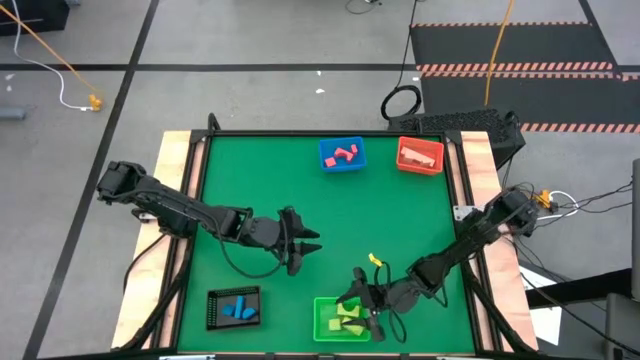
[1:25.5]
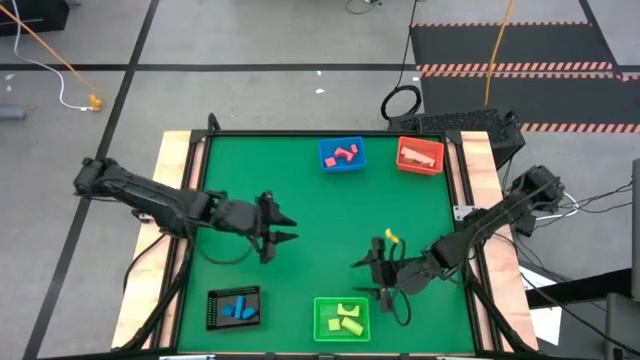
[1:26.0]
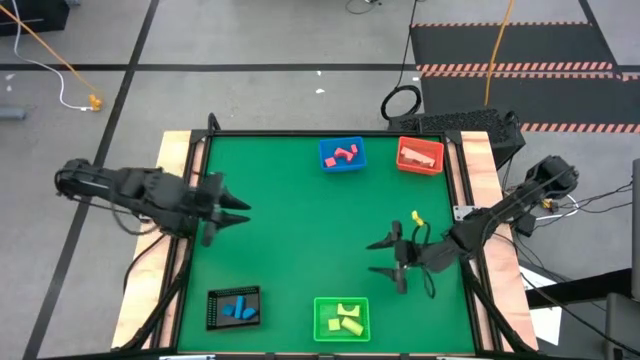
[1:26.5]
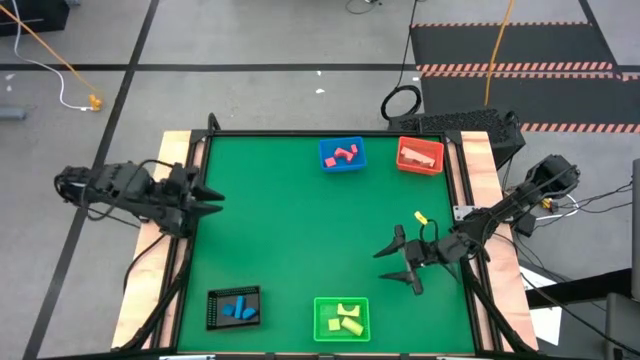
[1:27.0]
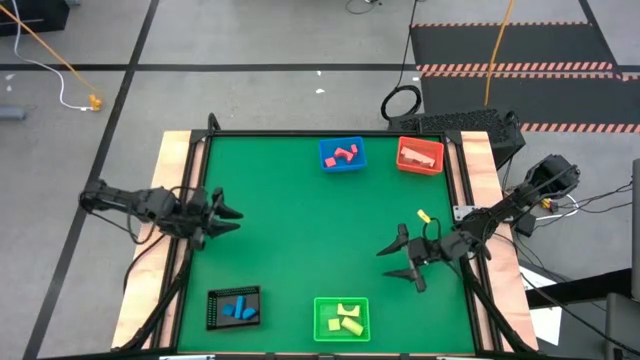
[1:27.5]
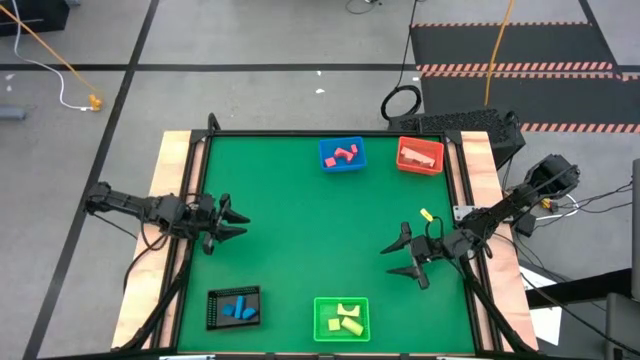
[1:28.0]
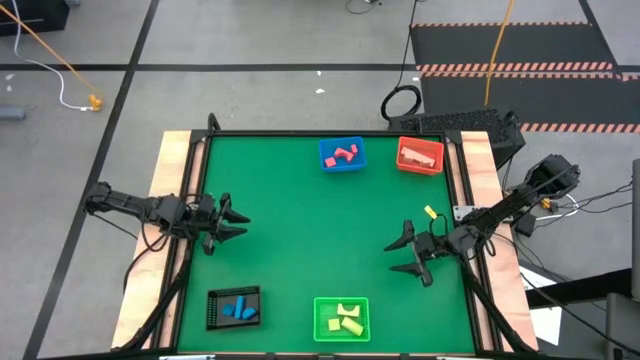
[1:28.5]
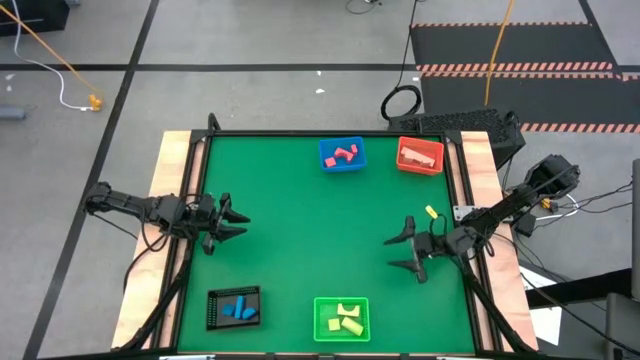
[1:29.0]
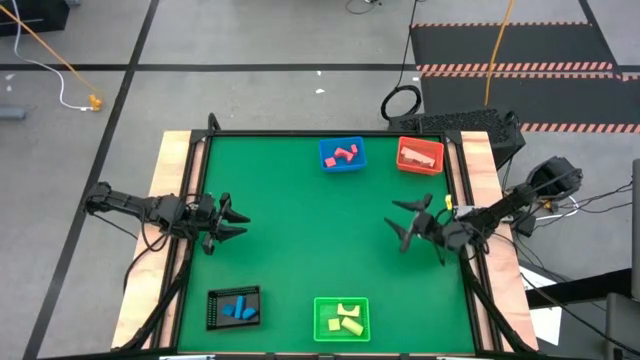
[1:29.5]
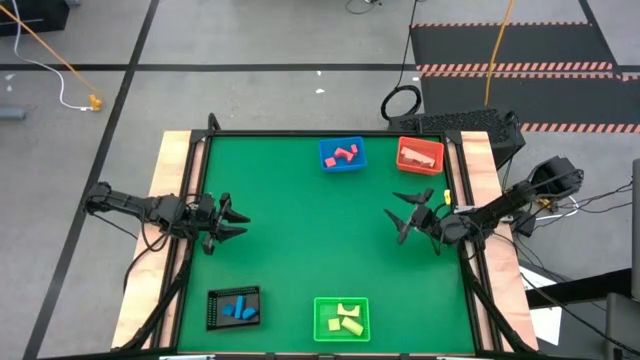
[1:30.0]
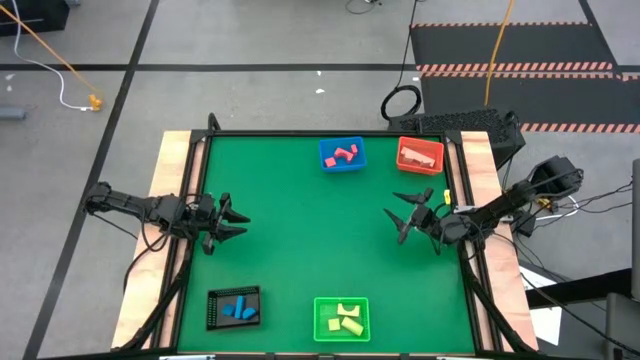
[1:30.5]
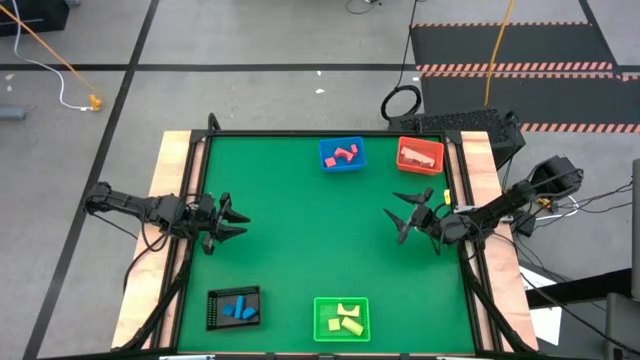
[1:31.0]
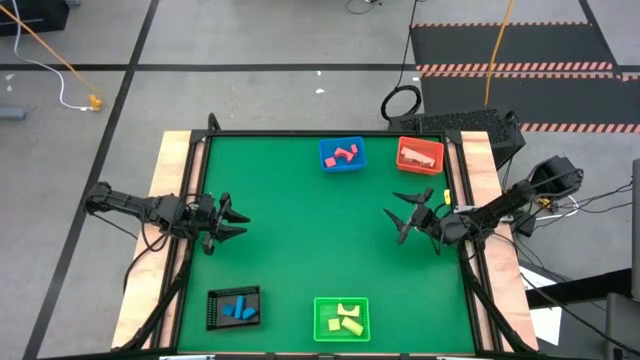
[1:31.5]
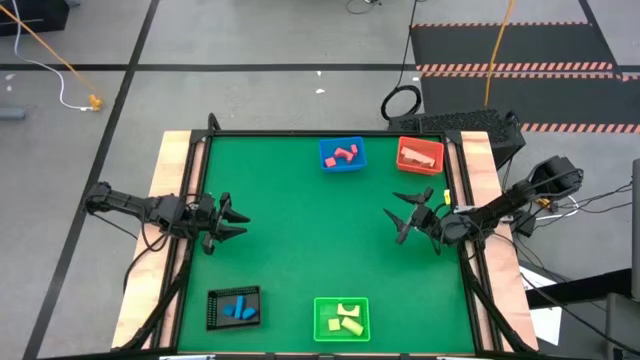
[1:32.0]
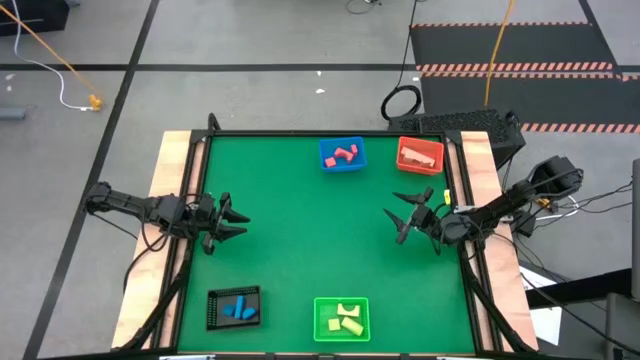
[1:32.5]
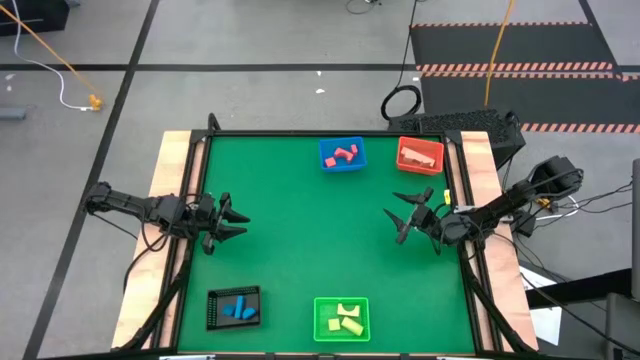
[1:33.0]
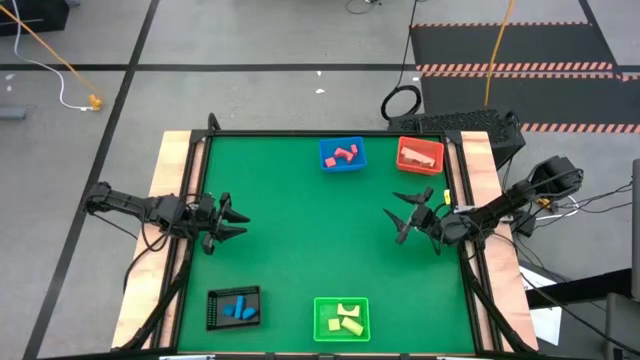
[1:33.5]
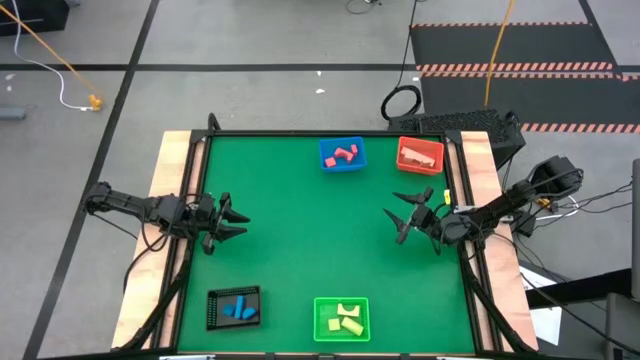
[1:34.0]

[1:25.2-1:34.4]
Task: Sort & place blocks by color
Return to Home Position

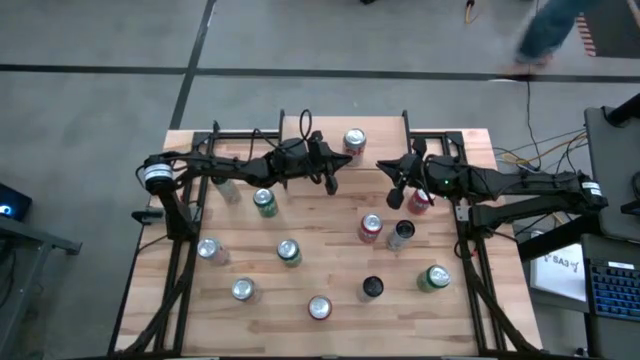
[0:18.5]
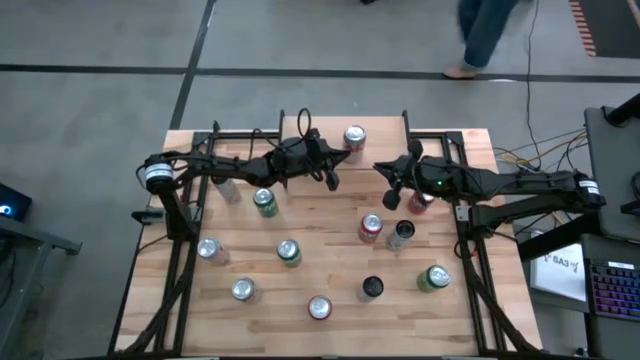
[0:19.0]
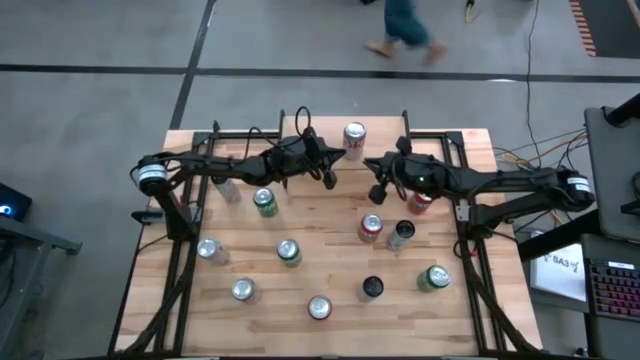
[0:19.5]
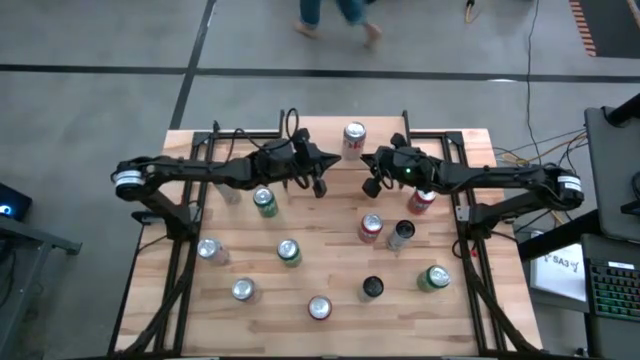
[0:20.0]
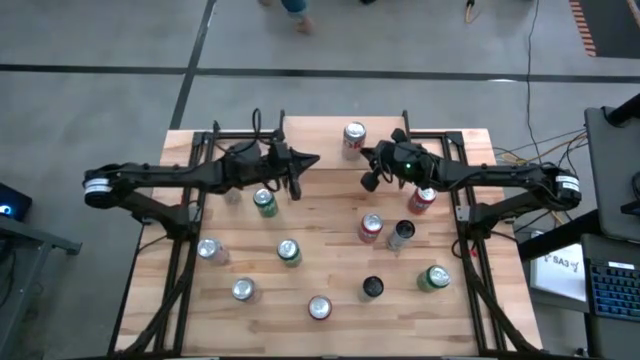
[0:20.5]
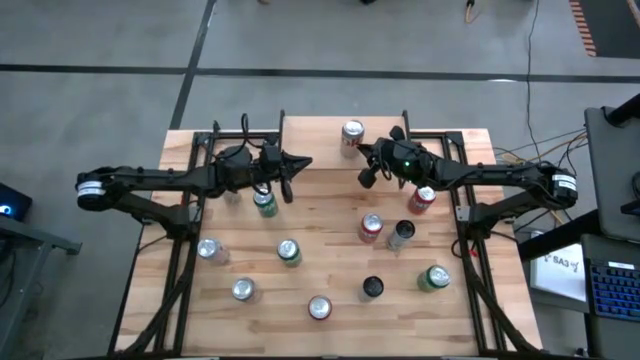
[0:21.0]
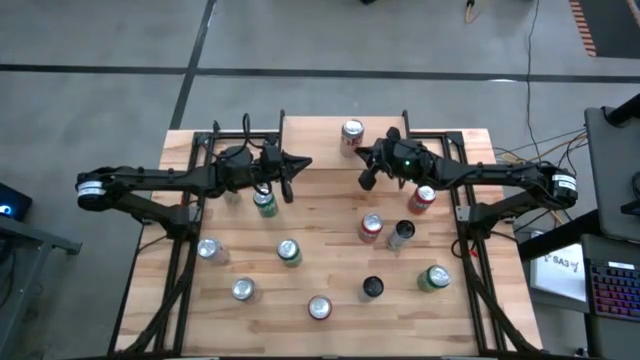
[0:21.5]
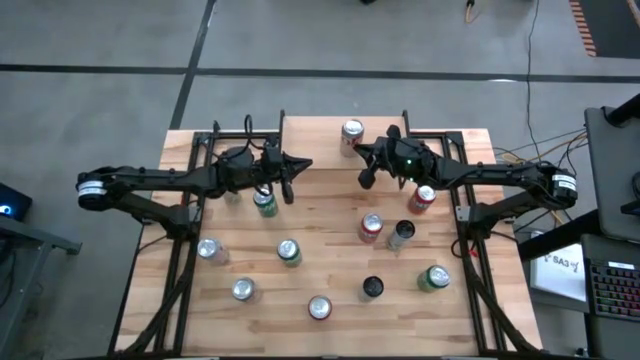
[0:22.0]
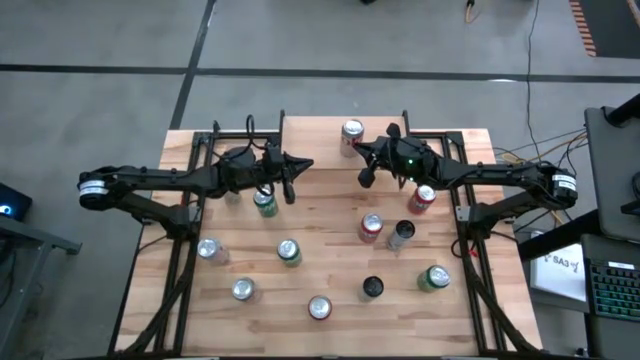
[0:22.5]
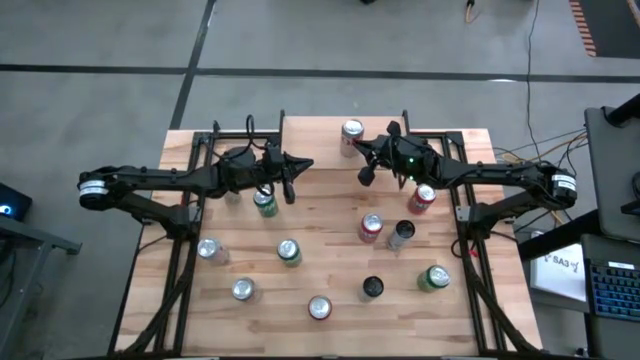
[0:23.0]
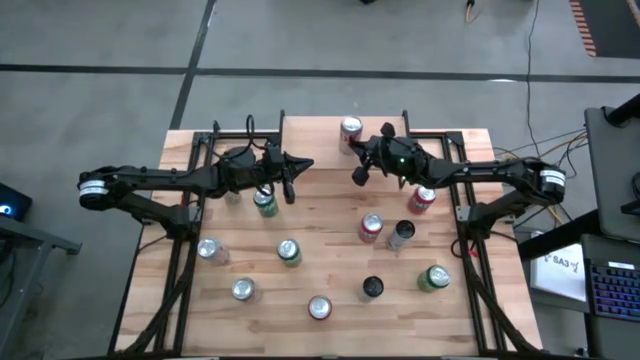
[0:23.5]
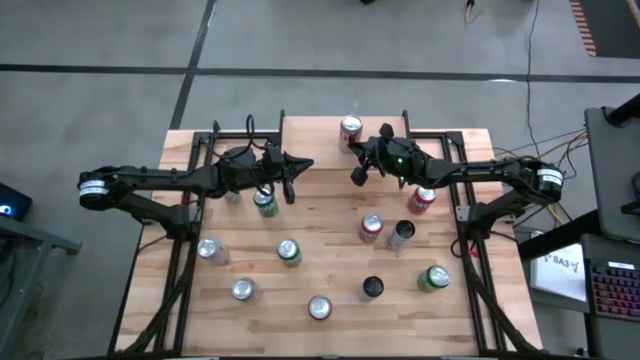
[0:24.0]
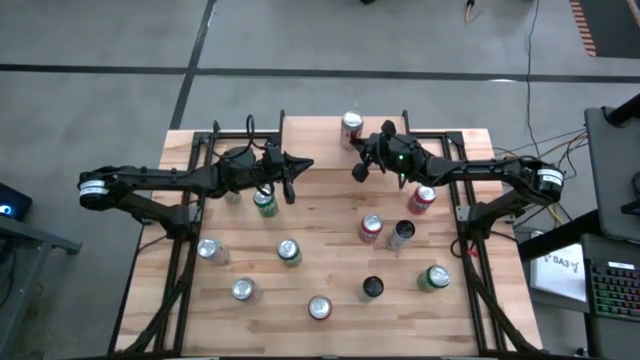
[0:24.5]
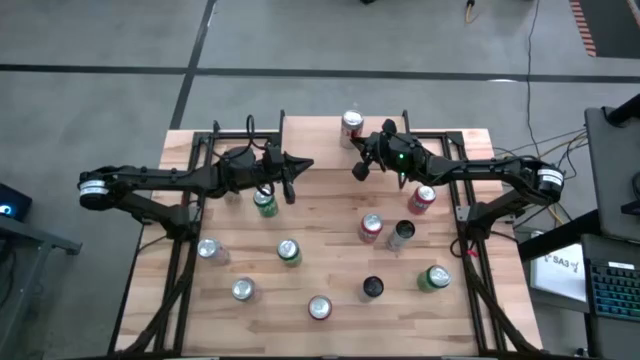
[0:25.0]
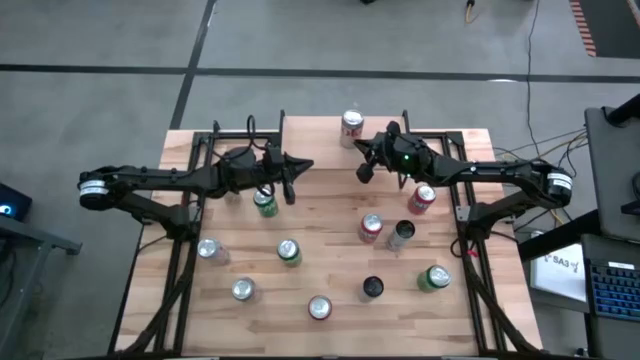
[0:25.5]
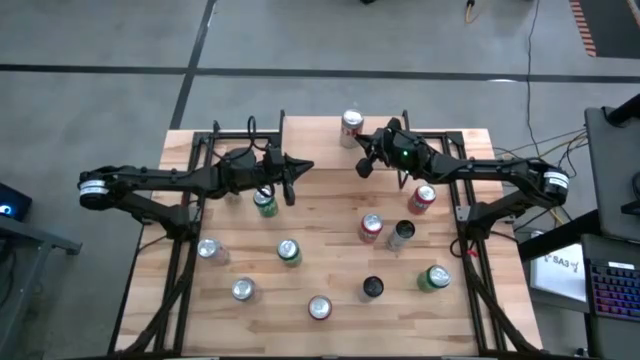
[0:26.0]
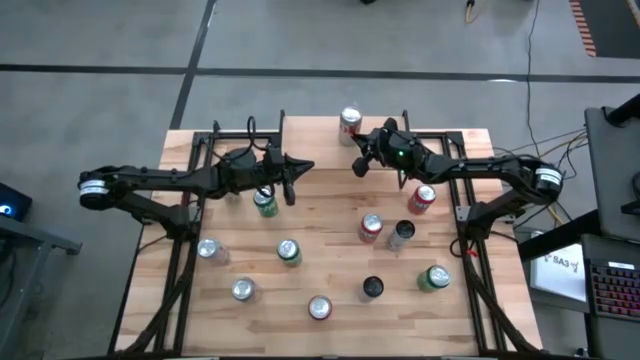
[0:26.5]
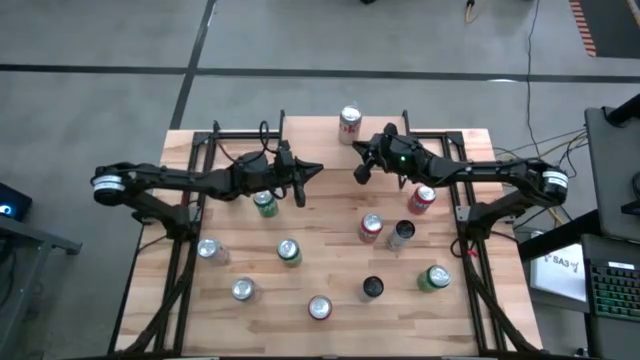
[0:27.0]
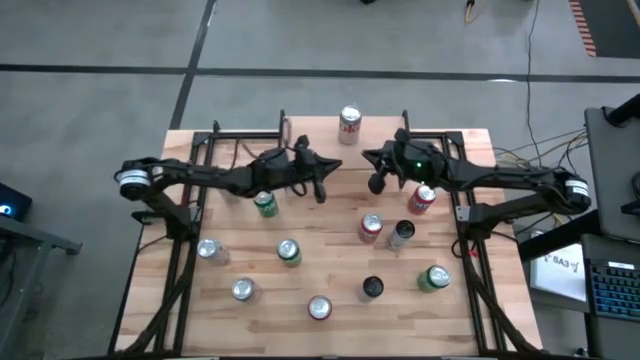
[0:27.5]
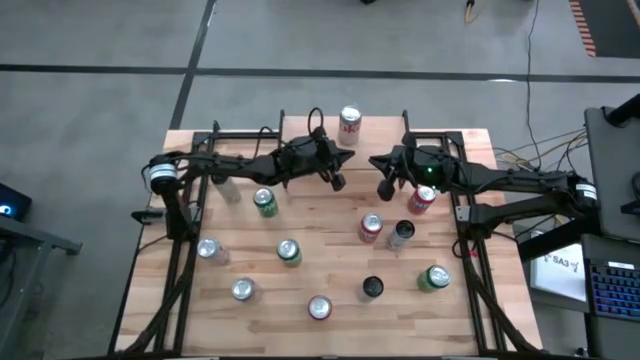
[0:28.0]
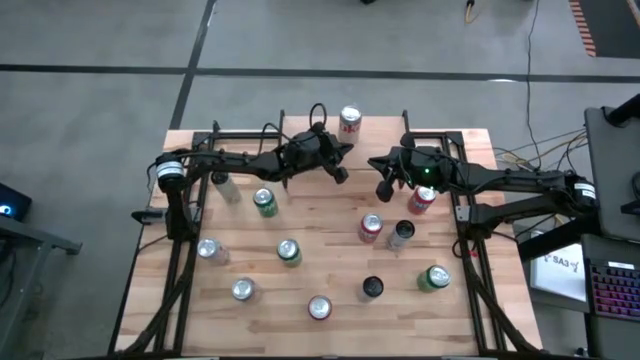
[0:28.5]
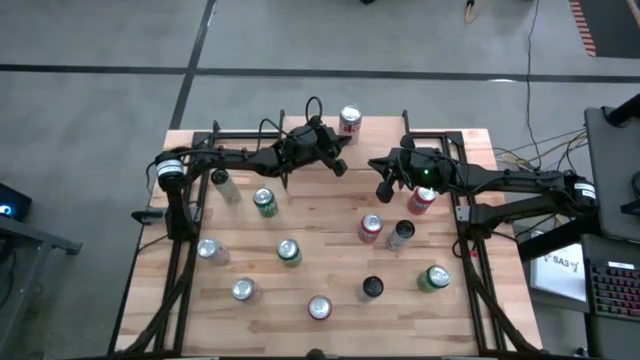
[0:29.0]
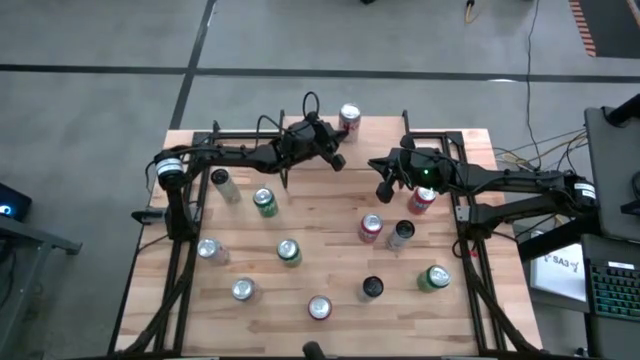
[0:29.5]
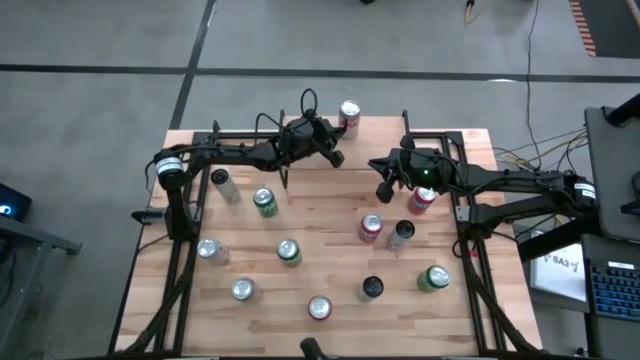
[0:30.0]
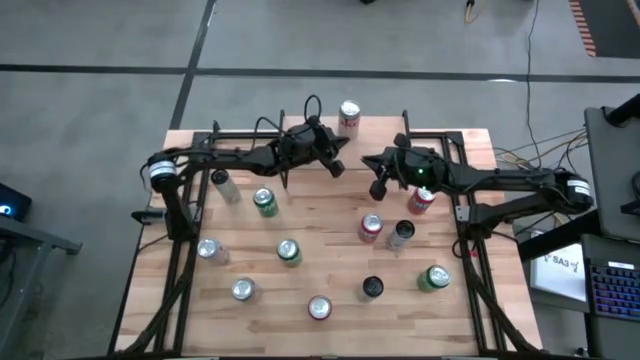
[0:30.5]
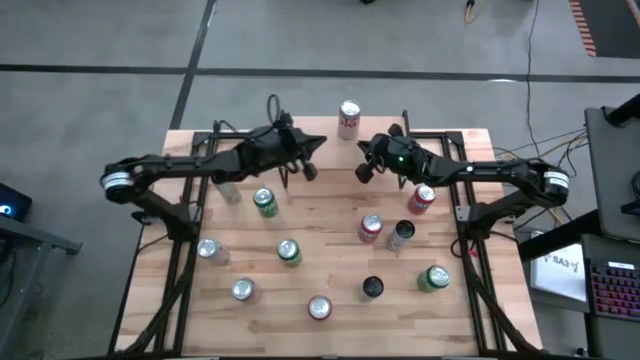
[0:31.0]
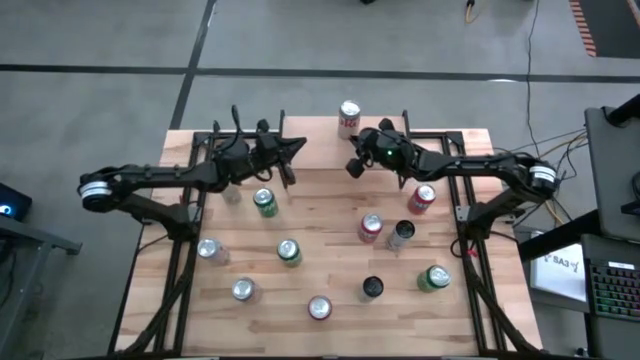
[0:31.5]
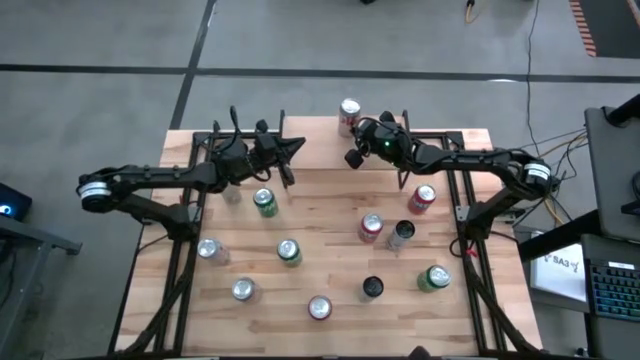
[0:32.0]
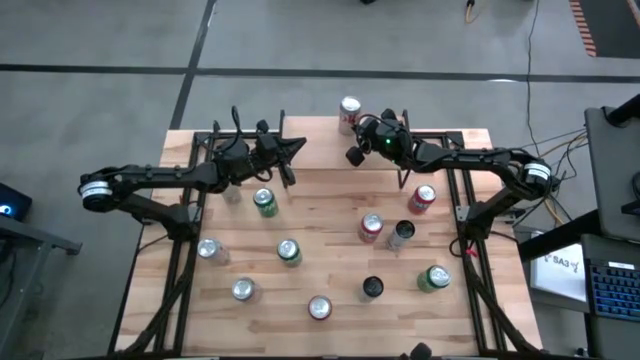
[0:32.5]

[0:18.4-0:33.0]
Task: Place canned beverage on shelf
Put the top white red soda can on the shelf
